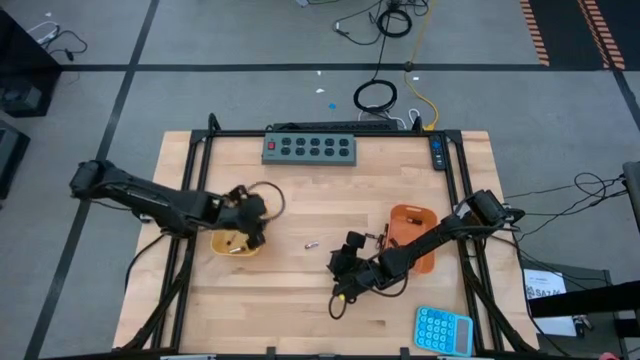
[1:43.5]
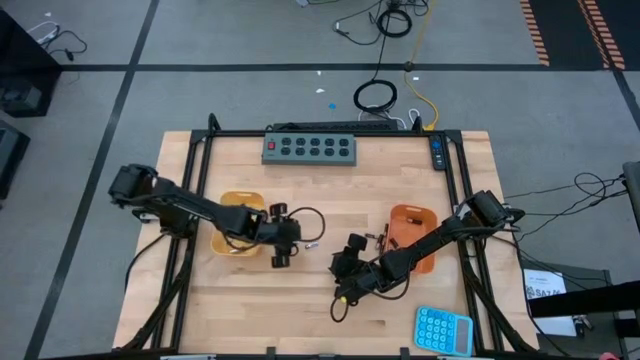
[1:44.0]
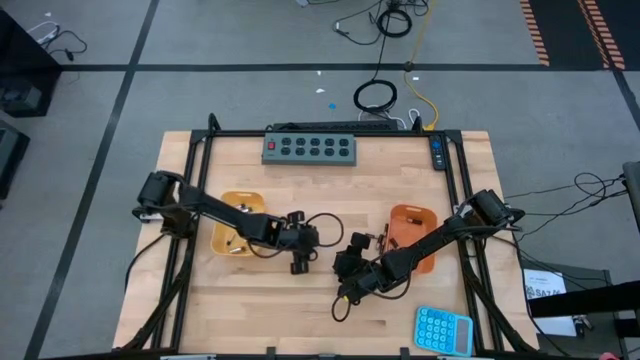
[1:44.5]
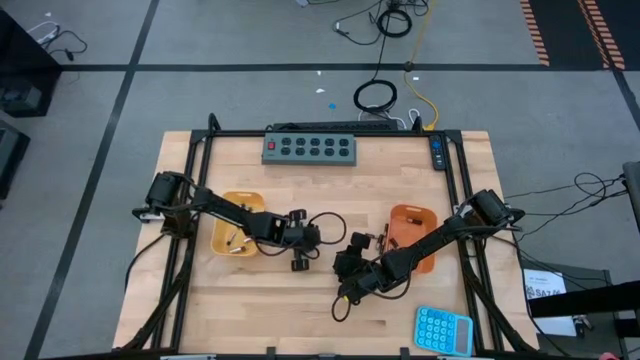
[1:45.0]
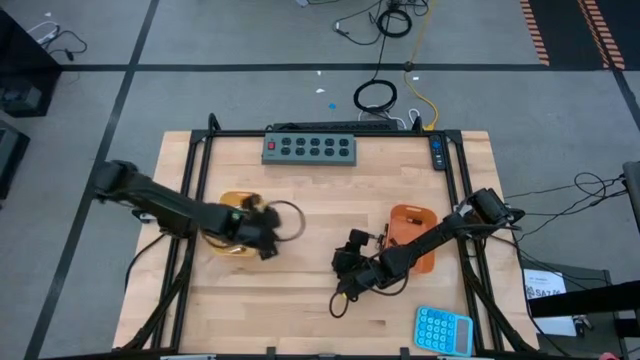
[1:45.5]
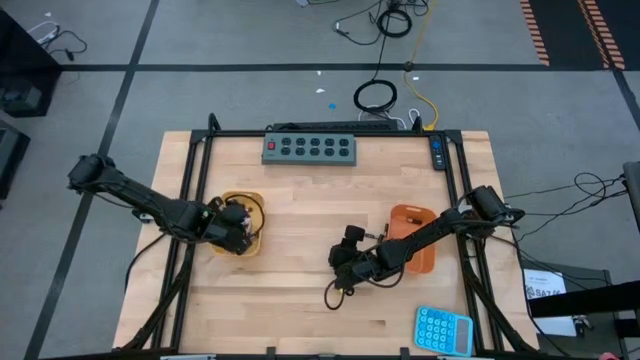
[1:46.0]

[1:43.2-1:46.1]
Task: Sort batteries
Put the silver battery into the yellow bin

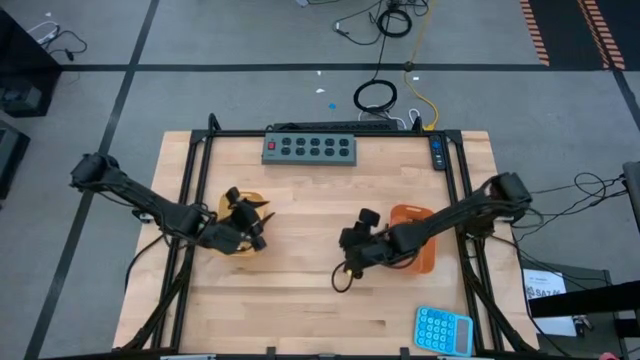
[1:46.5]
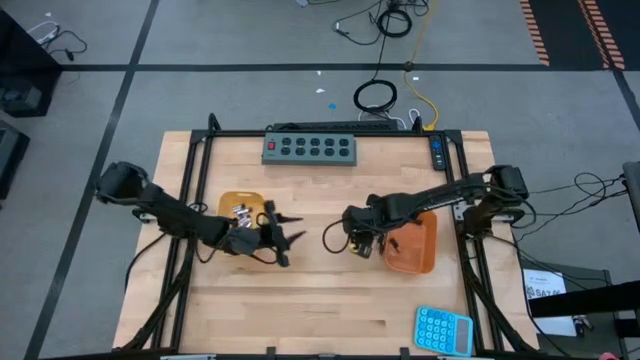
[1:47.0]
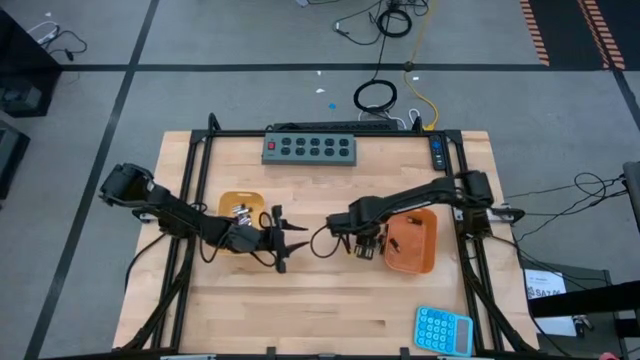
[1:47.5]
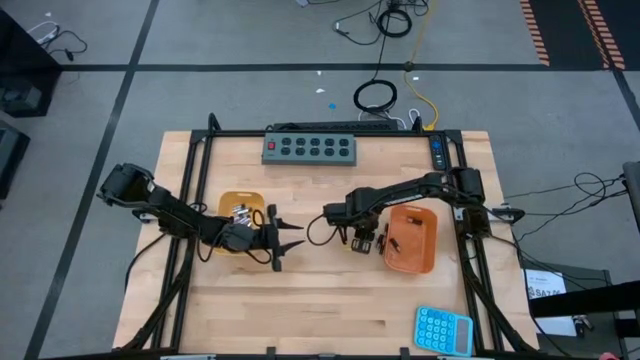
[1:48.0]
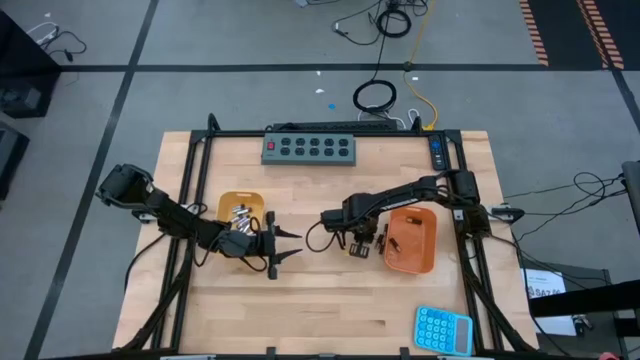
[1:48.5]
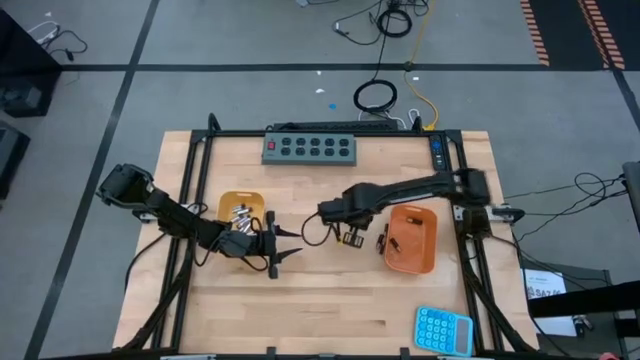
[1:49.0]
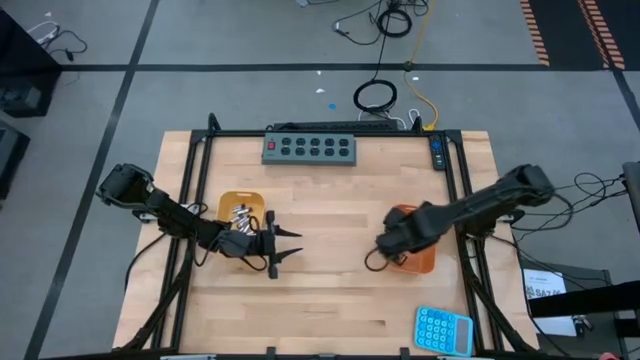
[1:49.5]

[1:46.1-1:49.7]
Put the black battery into the orange bin

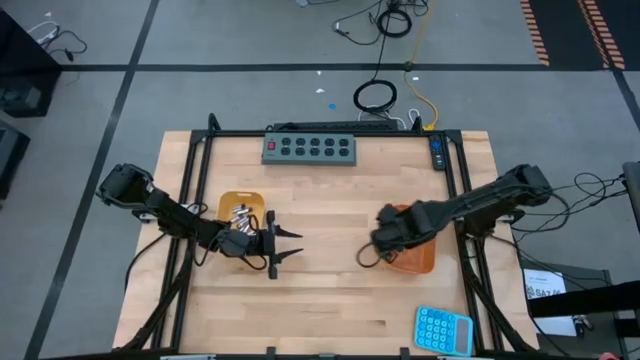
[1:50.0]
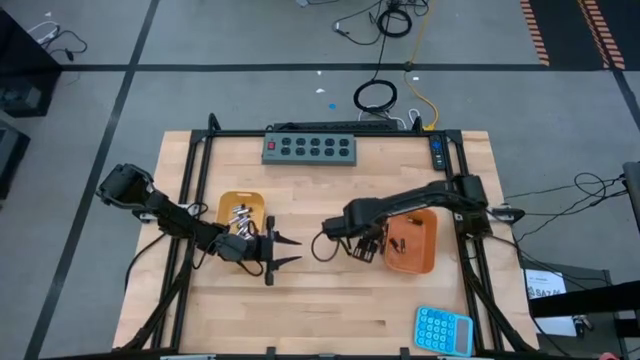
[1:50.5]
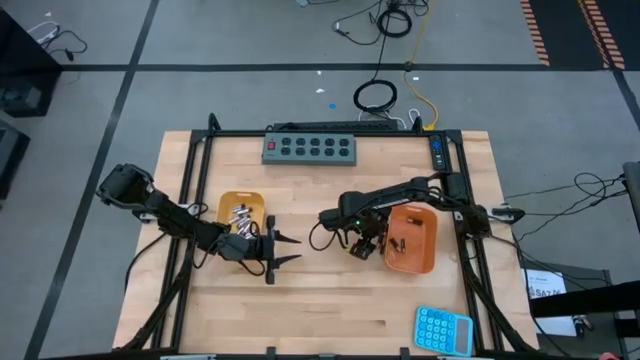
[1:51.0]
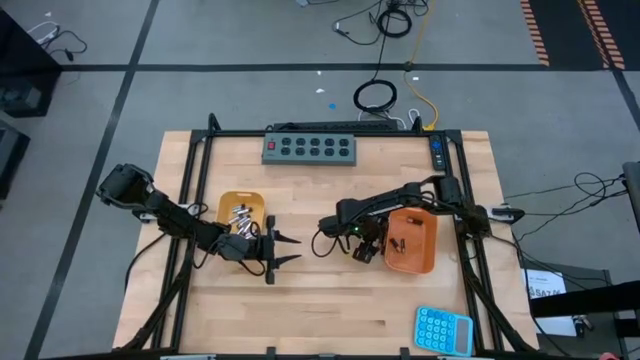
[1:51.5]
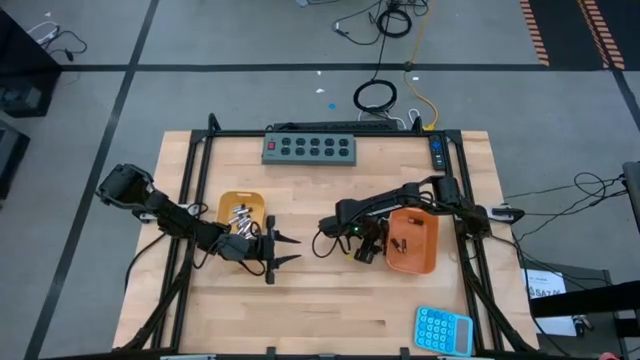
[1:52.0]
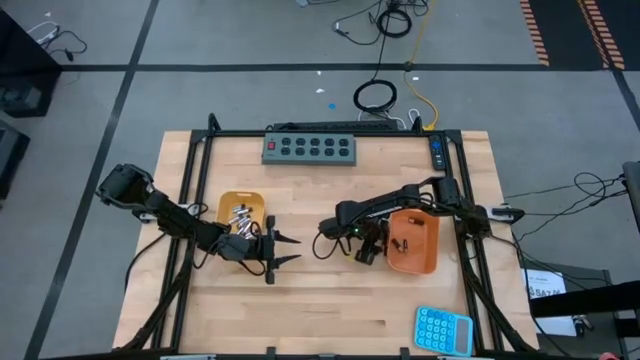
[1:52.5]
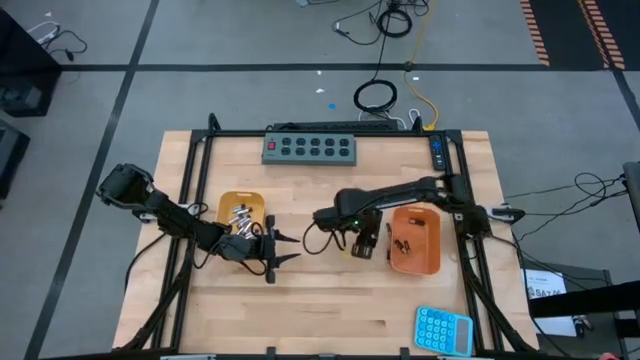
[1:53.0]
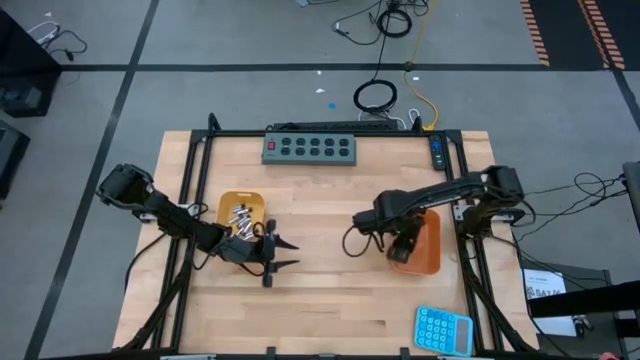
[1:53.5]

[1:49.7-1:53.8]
Put the black battery into the orange bin

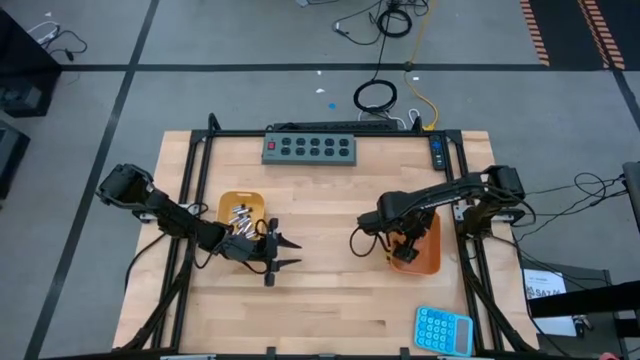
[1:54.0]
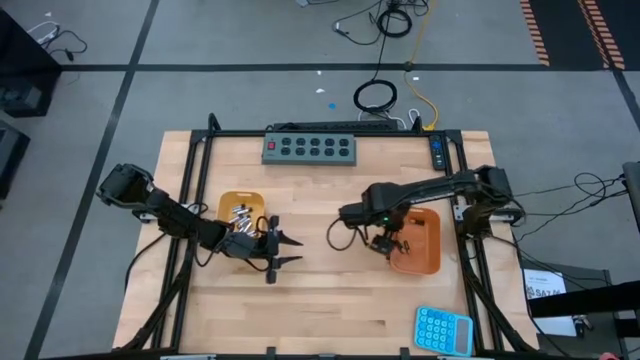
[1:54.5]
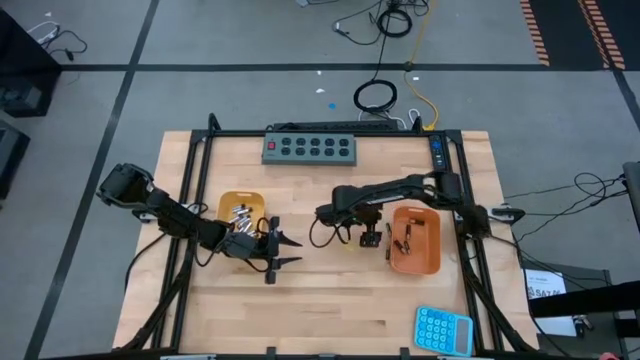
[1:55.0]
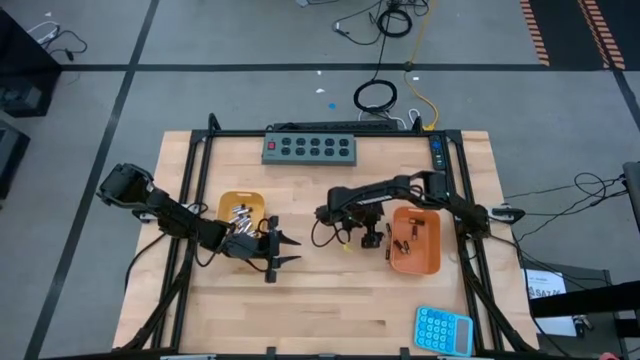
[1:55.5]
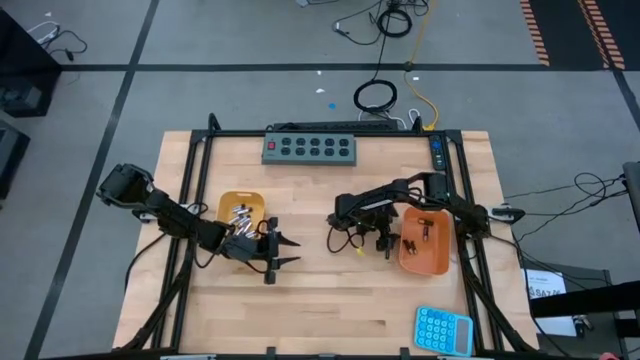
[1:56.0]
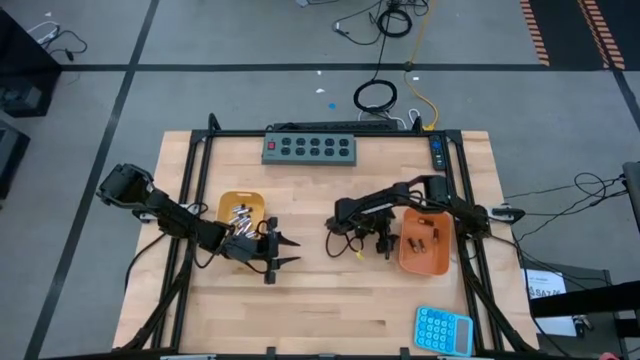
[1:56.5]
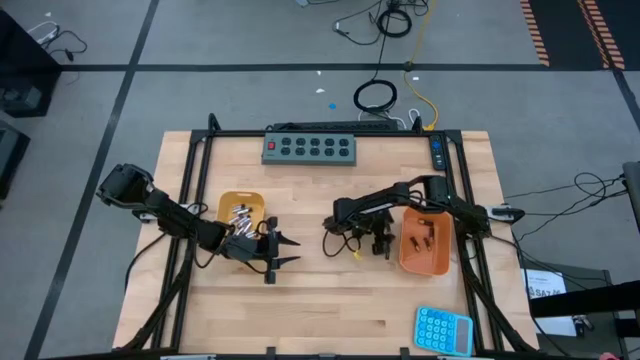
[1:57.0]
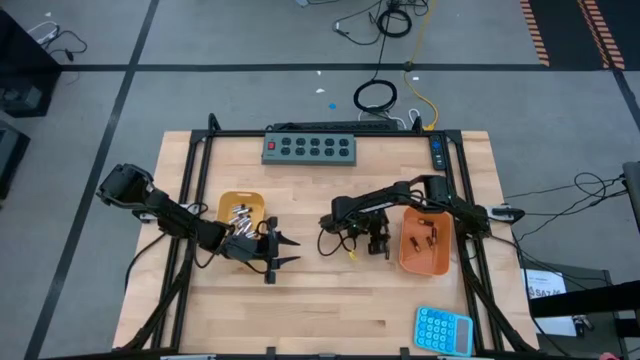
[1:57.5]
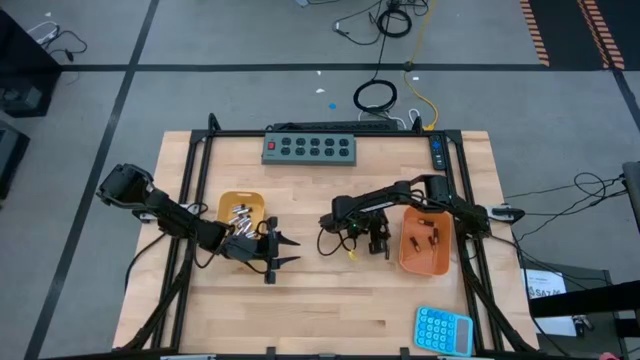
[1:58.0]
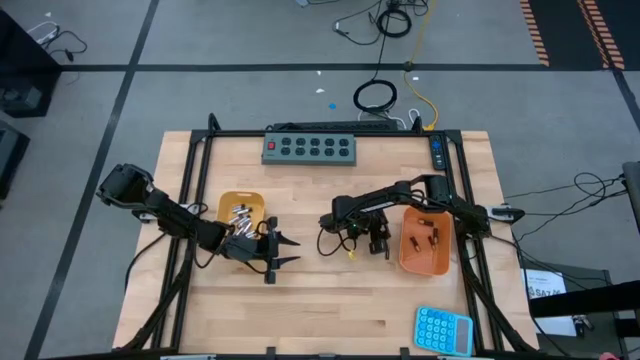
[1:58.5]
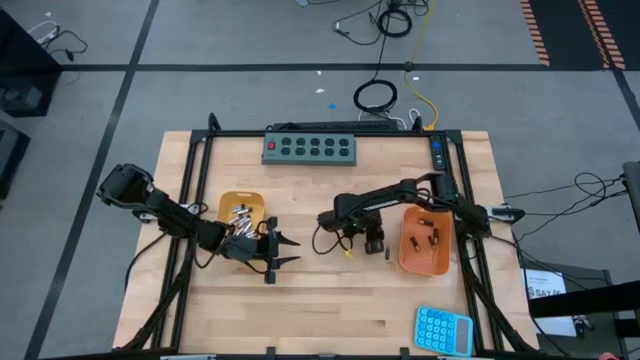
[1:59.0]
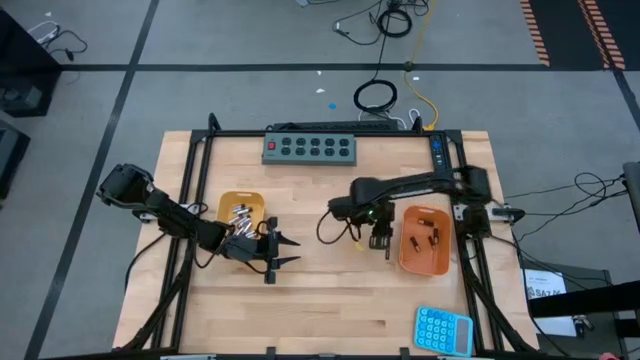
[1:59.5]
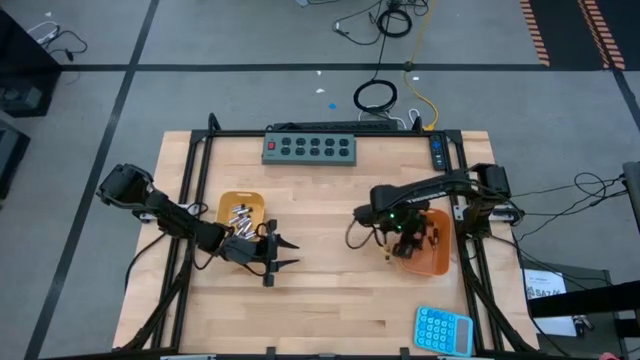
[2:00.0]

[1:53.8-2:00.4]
Put the black battery into the orange bin

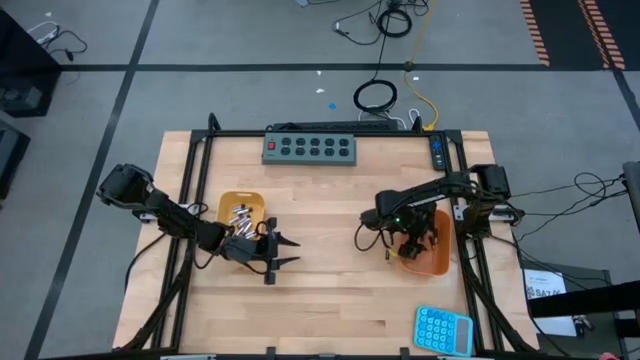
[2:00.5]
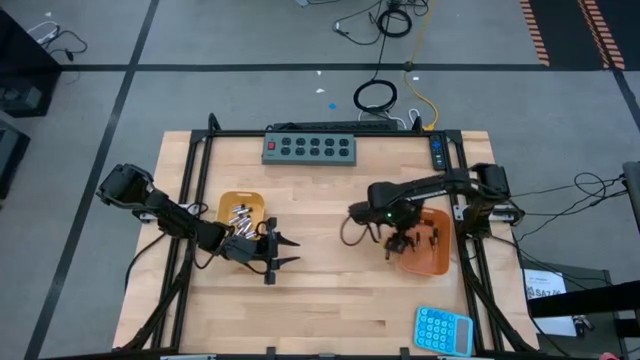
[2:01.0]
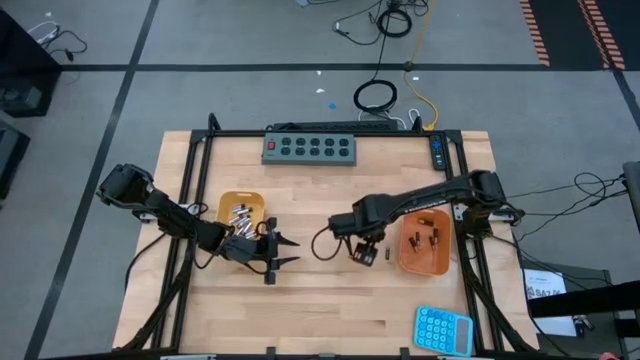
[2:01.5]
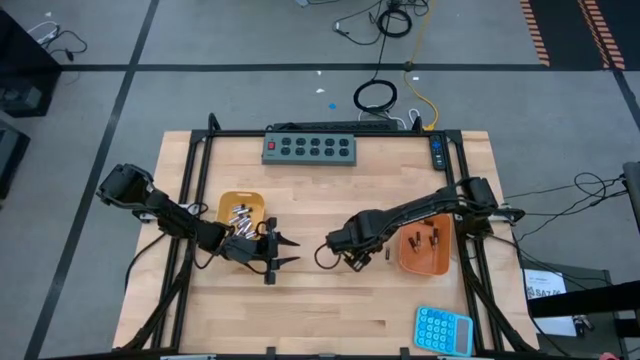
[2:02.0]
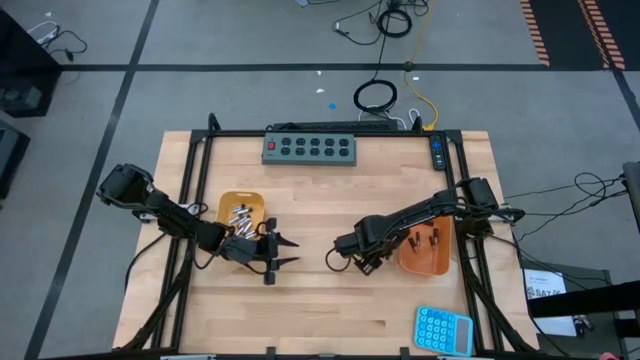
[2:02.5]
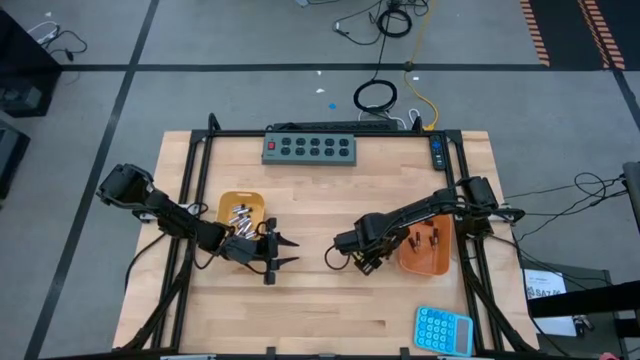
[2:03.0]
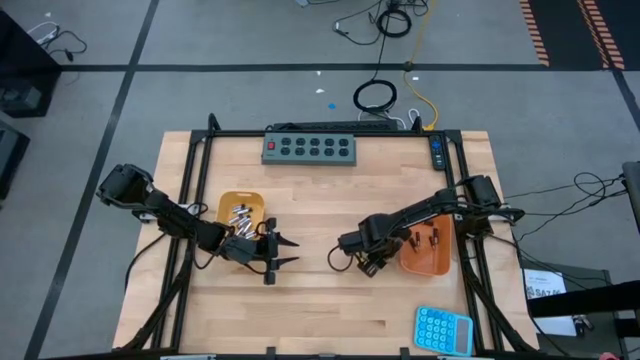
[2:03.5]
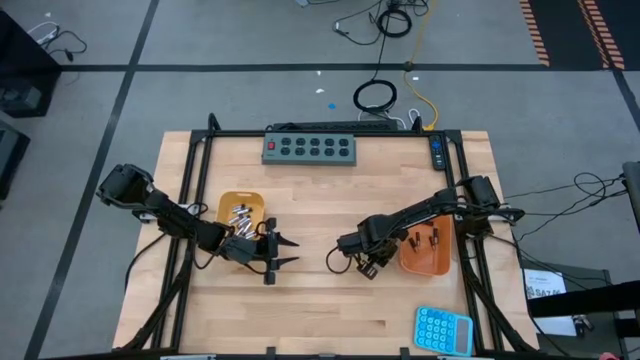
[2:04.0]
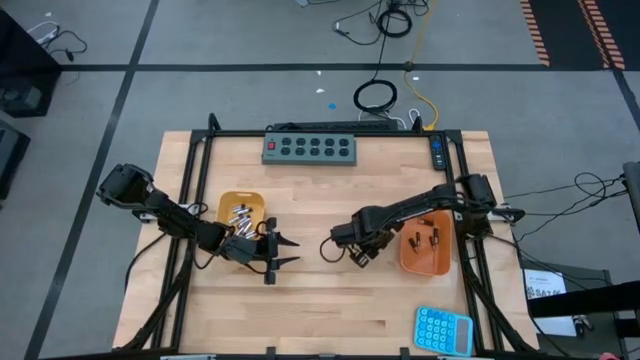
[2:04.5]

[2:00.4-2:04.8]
Put the black battery into the orange bin

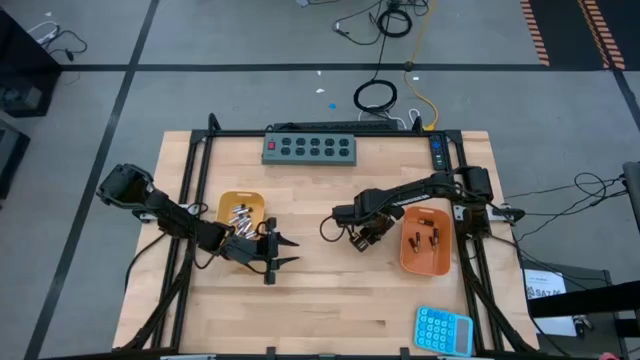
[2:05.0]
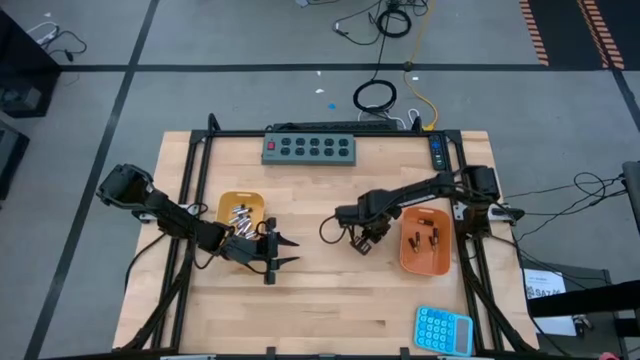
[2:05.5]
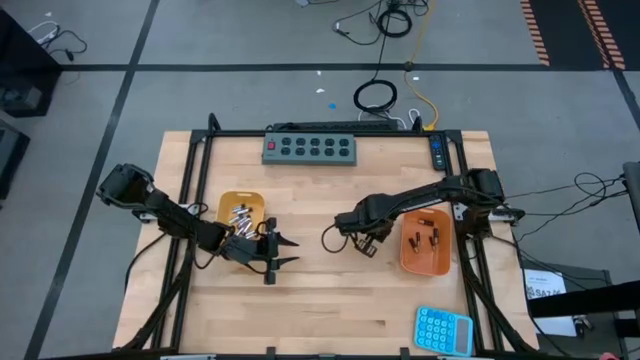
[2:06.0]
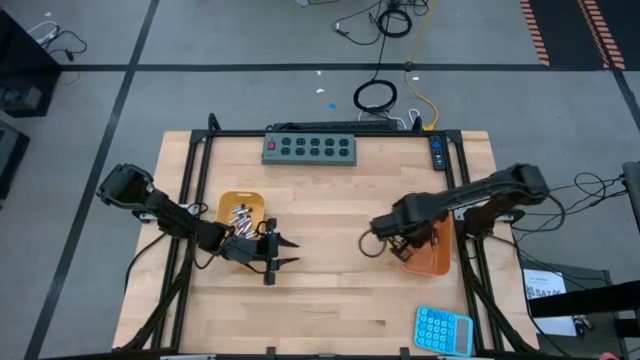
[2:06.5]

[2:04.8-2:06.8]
Put the black battery into the orange bin
